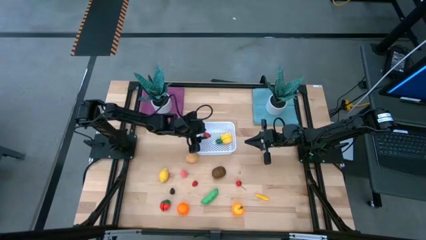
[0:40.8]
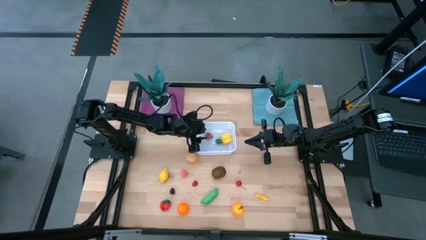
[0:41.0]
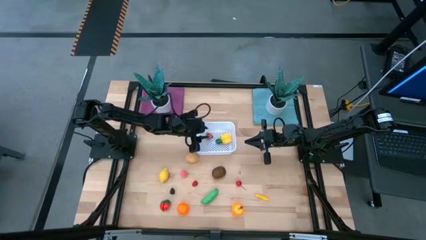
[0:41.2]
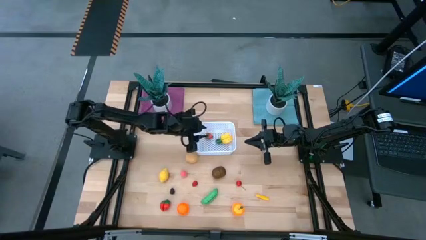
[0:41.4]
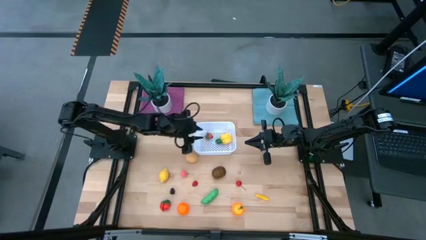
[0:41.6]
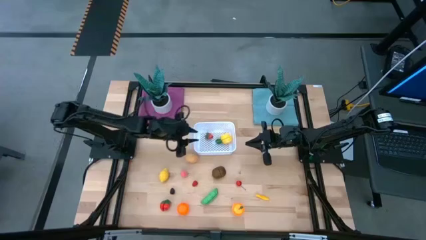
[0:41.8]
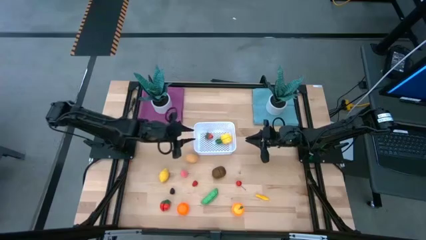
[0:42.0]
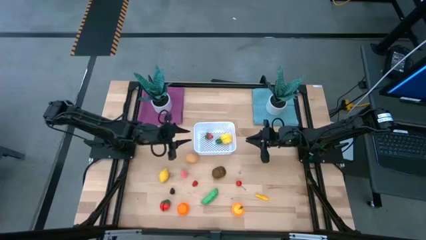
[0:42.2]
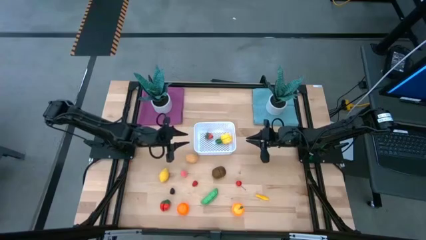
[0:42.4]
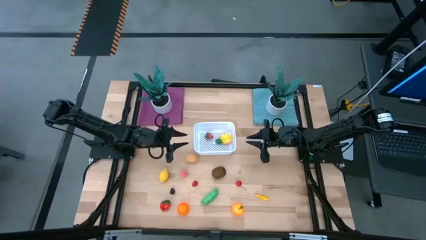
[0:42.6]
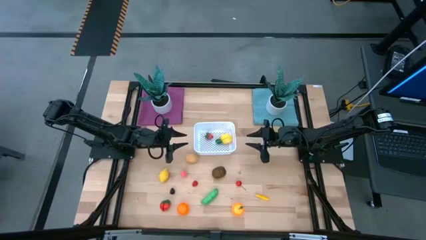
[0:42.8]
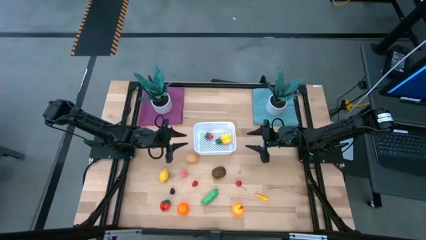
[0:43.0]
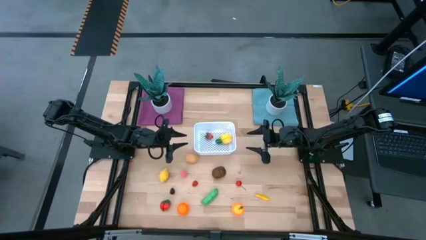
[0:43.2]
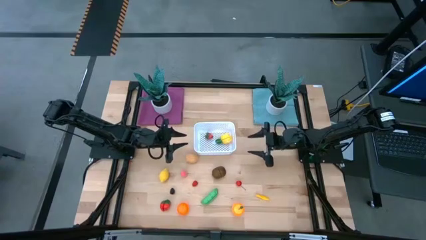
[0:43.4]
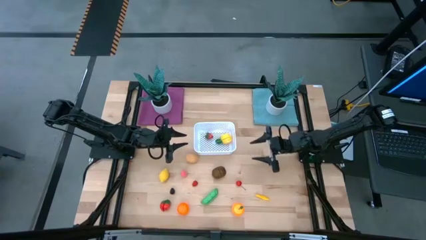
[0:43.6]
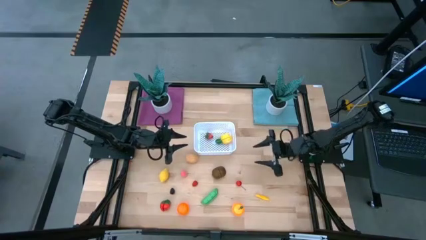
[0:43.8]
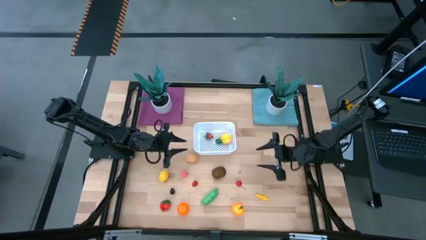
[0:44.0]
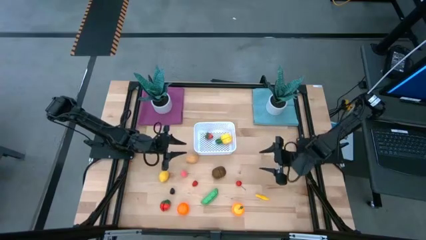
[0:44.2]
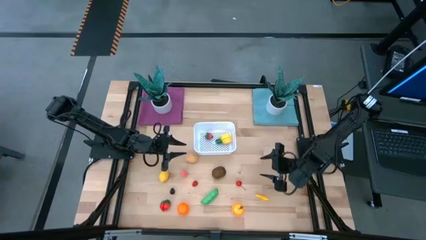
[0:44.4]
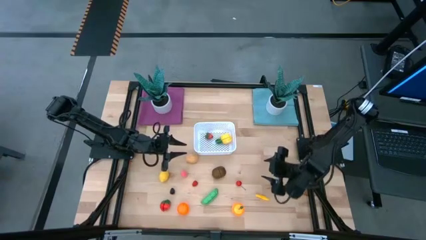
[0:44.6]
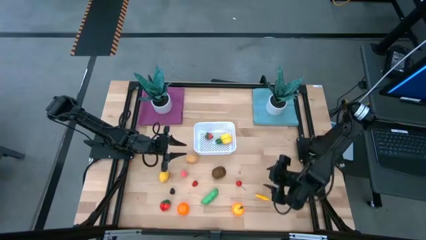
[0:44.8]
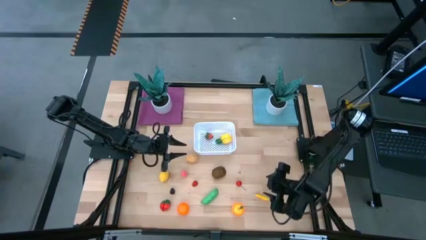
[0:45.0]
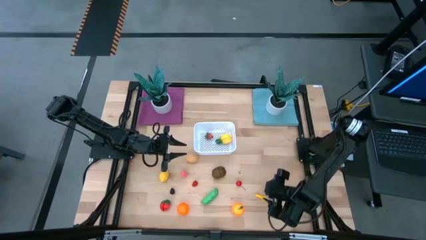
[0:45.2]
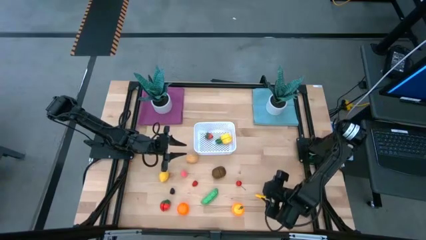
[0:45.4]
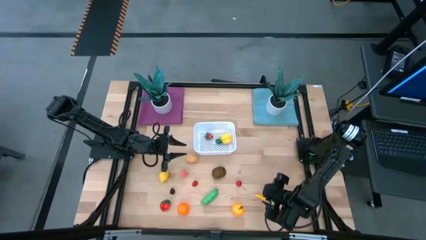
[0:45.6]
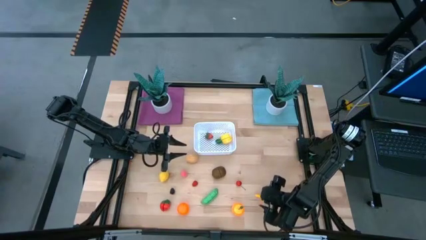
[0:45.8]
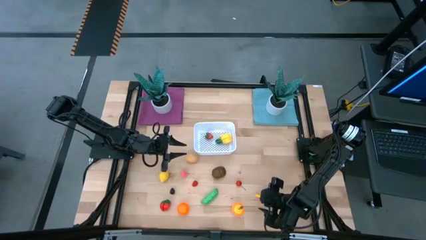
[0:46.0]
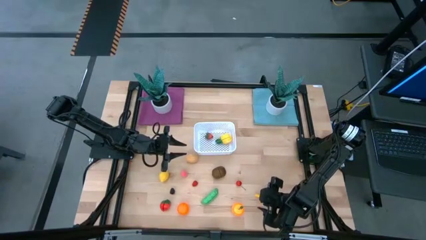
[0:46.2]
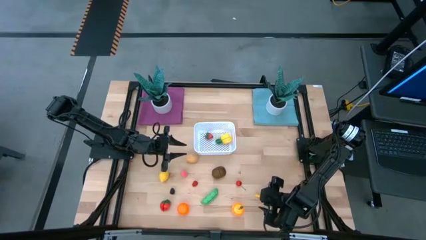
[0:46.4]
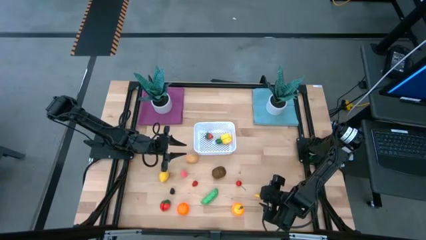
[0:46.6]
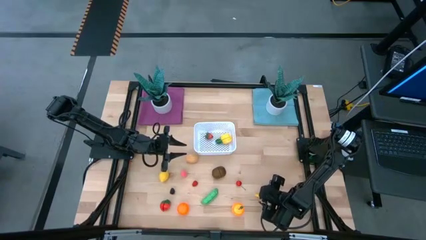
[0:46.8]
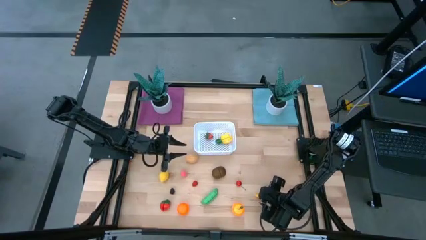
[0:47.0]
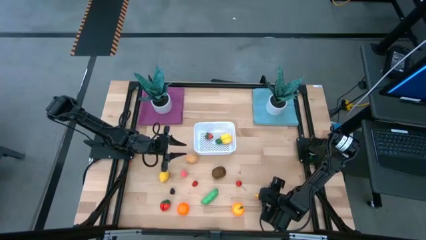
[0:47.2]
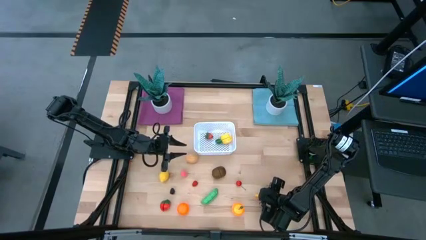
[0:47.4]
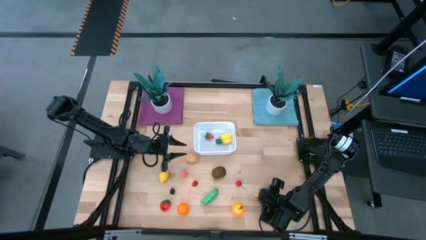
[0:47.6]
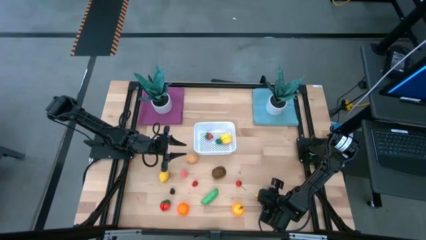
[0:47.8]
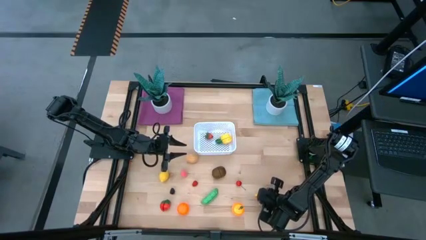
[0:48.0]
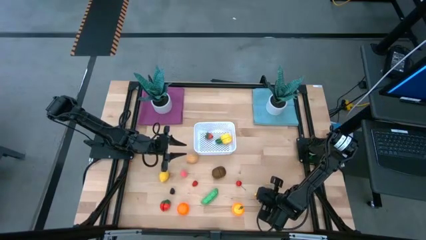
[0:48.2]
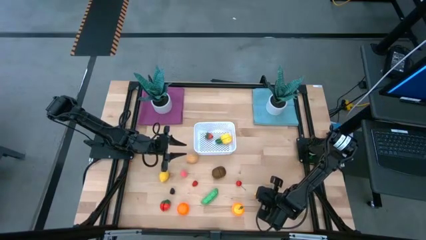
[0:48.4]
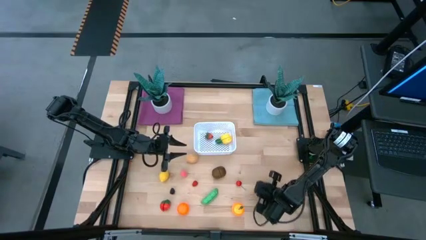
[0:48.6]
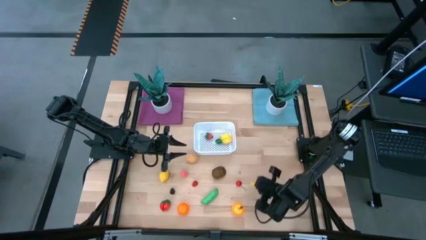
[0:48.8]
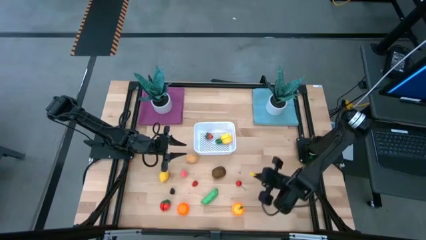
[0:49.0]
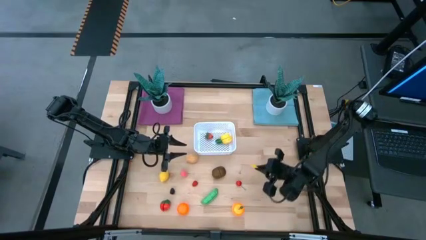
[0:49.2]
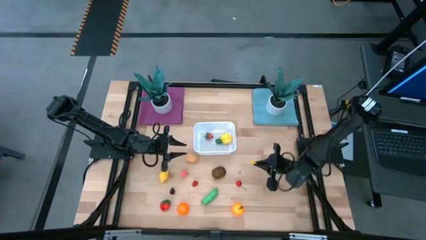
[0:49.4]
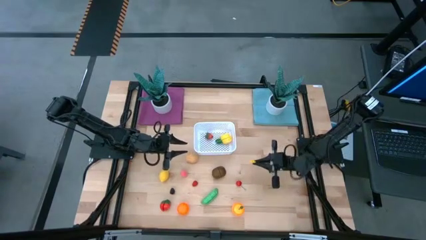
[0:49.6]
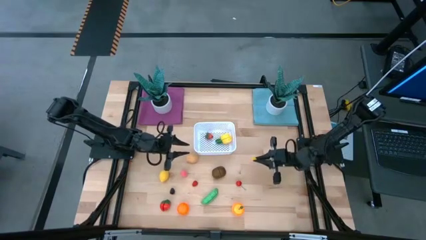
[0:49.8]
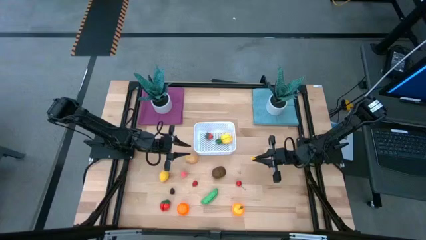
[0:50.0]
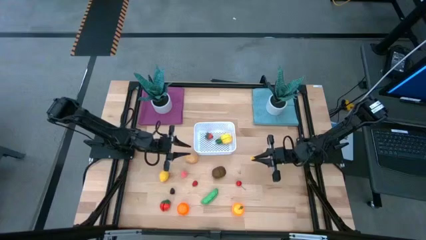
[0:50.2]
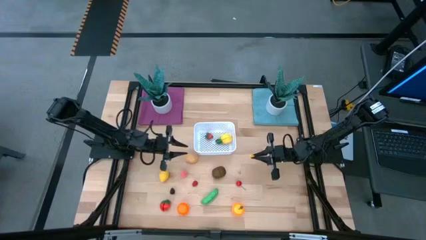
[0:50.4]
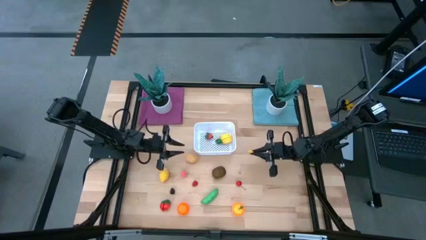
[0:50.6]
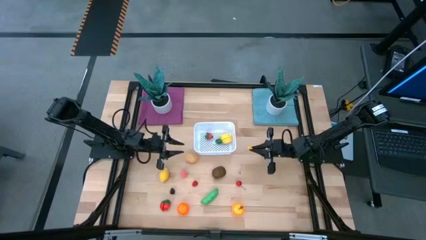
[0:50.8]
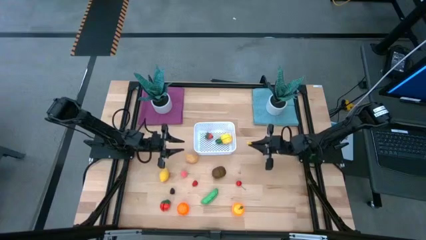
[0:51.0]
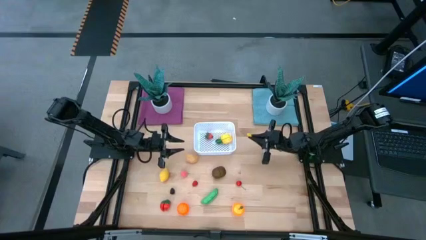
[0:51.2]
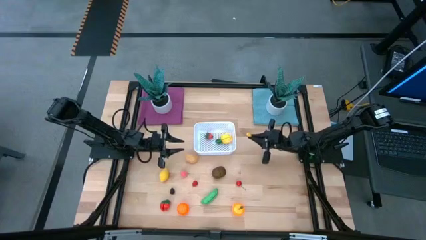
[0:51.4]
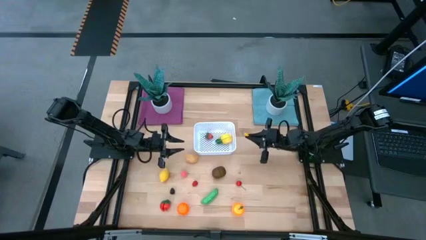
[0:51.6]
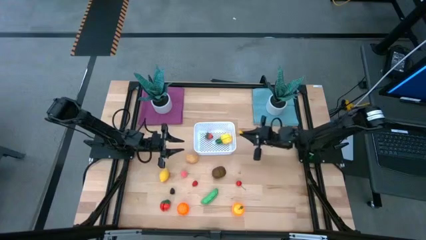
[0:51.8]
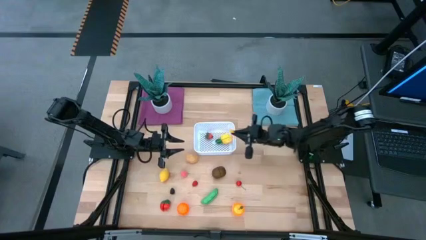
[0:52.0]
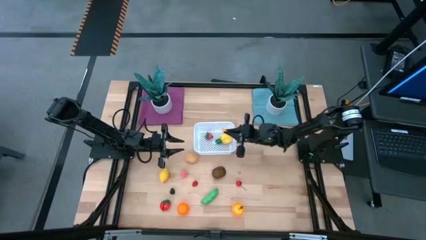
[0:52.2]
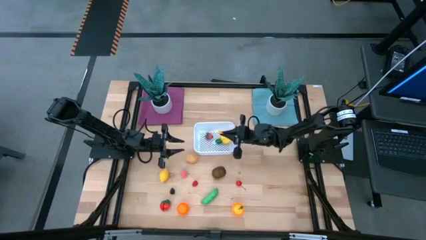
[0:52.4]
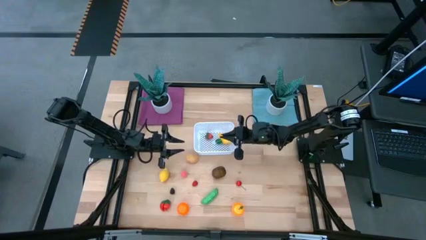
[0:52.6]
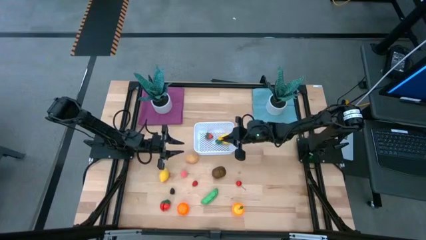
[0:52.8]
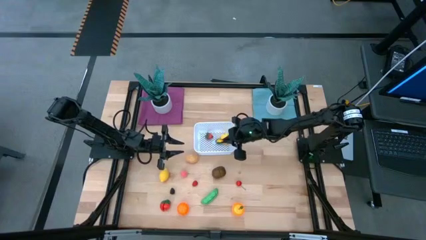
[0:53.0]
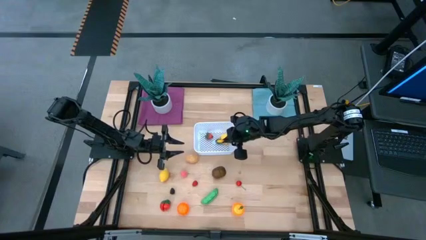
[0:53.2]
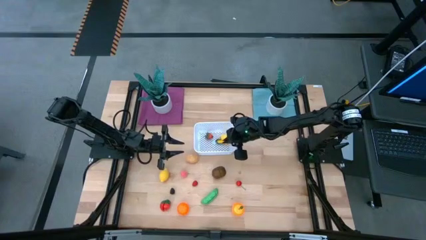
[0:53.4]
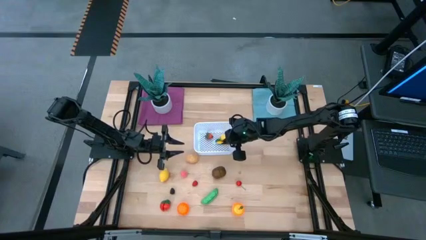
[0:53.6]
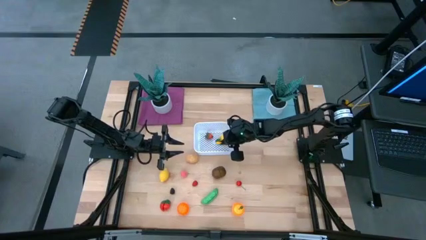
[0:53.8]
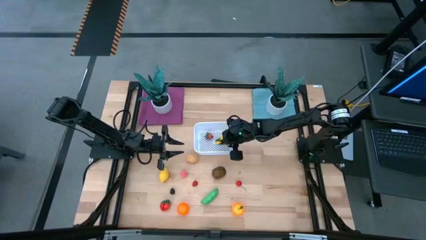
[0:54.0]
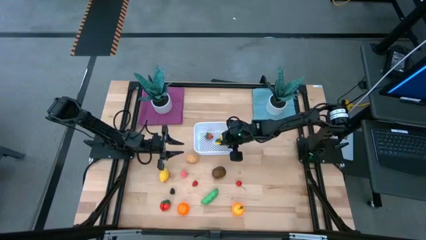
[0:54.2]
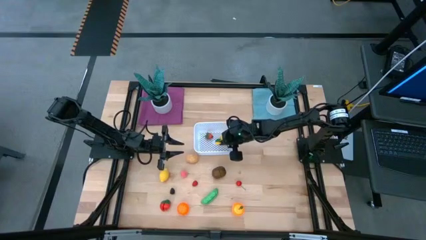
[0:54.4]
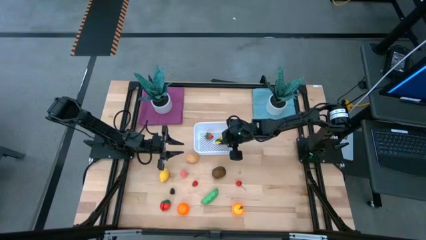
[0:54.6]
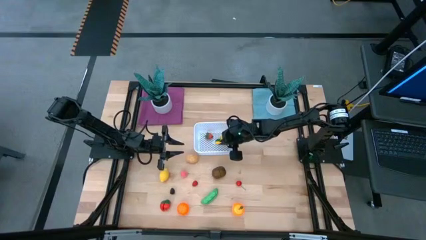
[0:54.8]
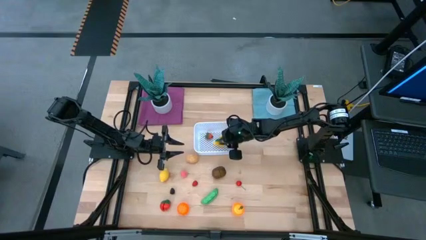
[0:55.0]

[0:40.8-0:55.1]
Task: Pick and placing Produce into tupperware
Put the yellow corn into the white bin
